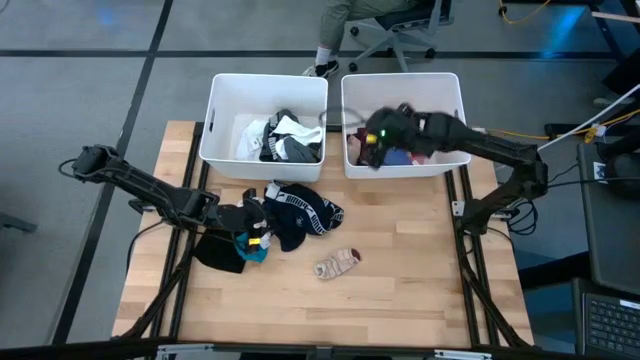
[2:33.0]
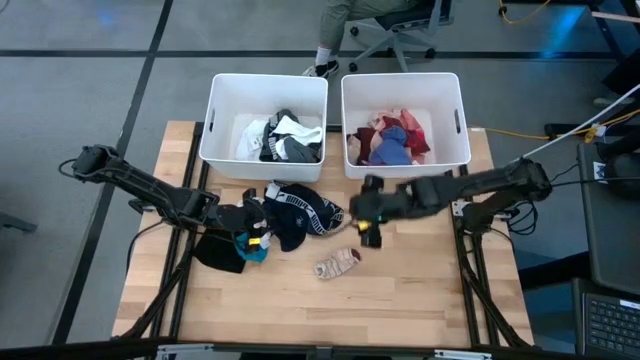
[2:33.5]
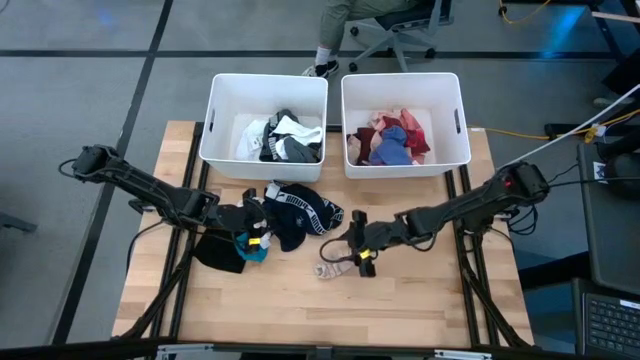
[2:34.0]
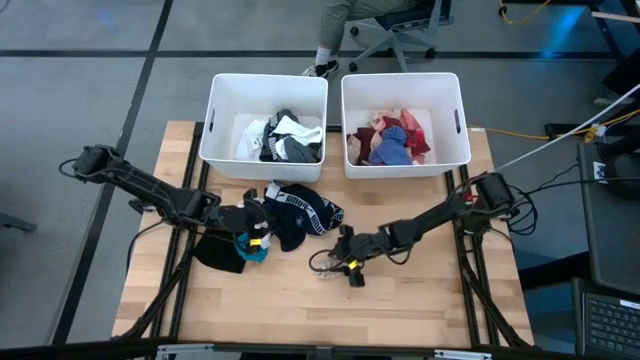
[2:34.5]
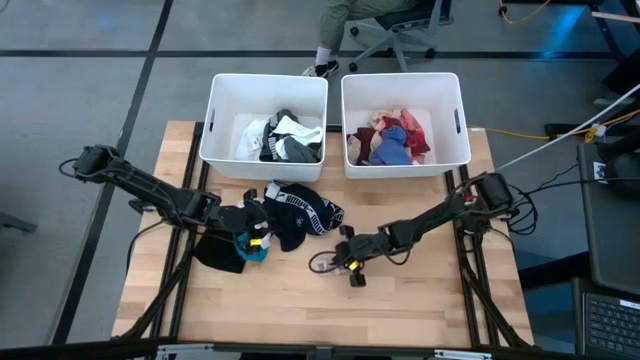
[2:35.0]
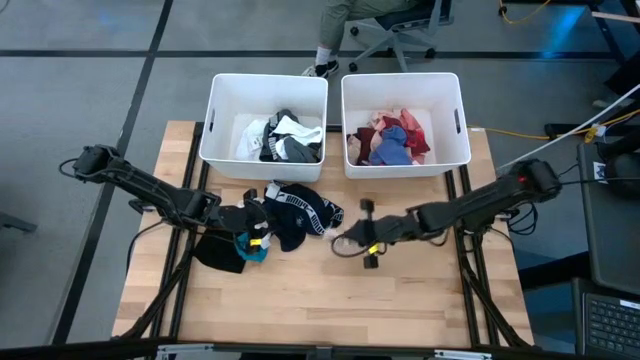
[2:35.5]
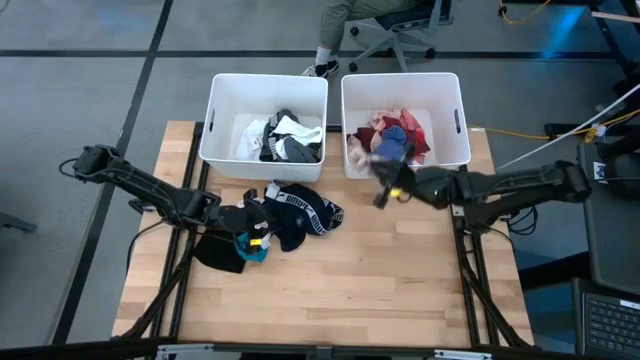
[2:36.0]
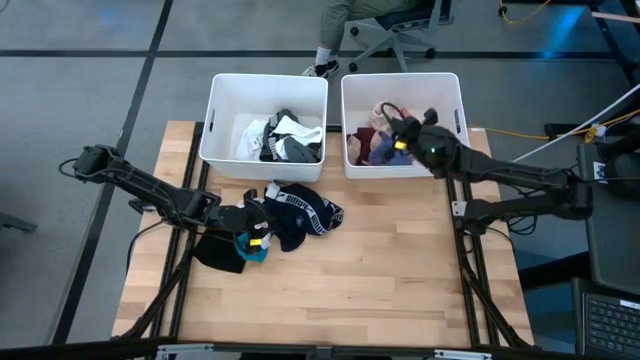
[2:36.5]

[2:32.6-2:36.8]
Task: Sort clothes
Put the brown stripe sock into the right white laundry bin

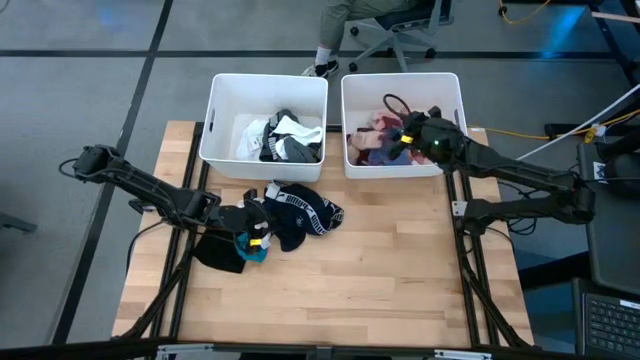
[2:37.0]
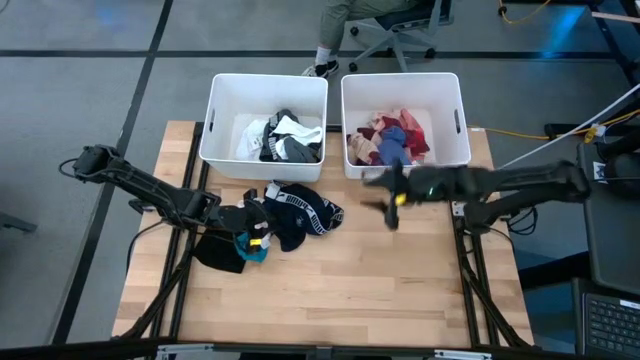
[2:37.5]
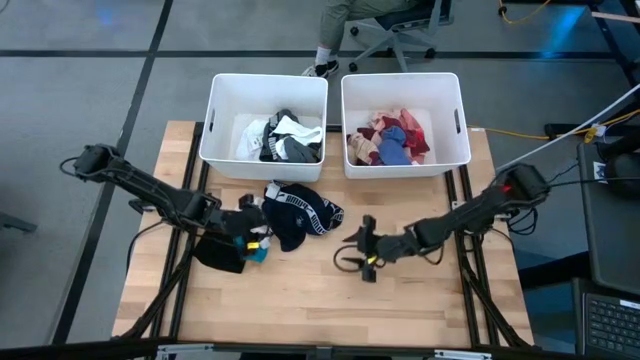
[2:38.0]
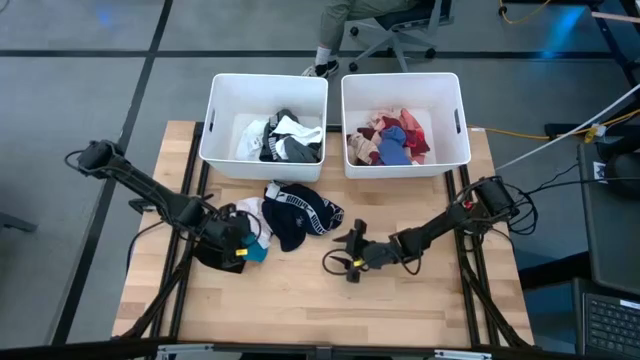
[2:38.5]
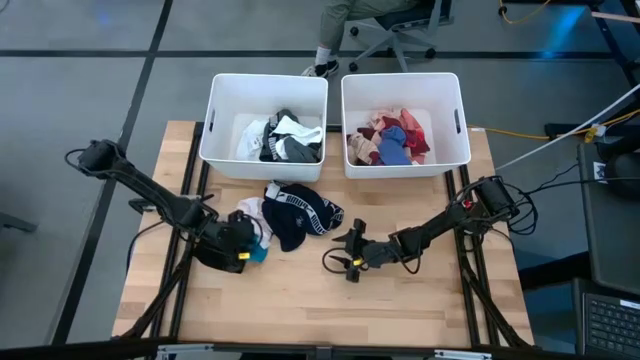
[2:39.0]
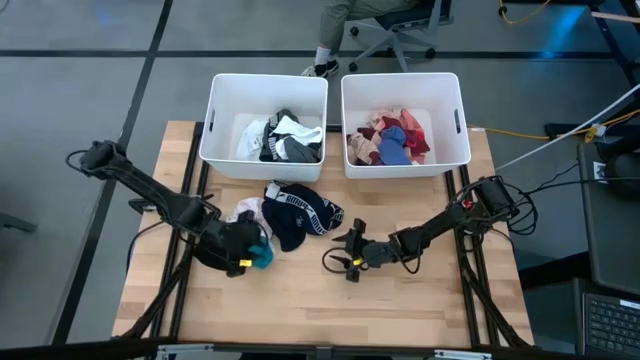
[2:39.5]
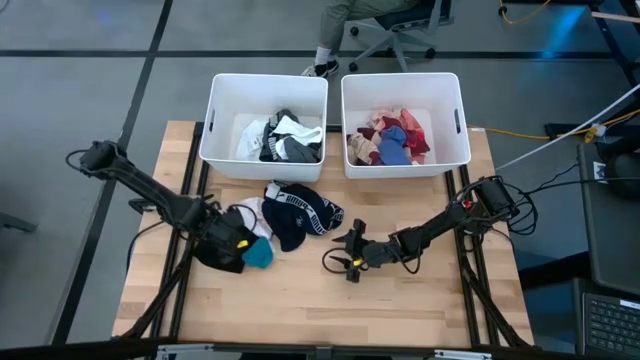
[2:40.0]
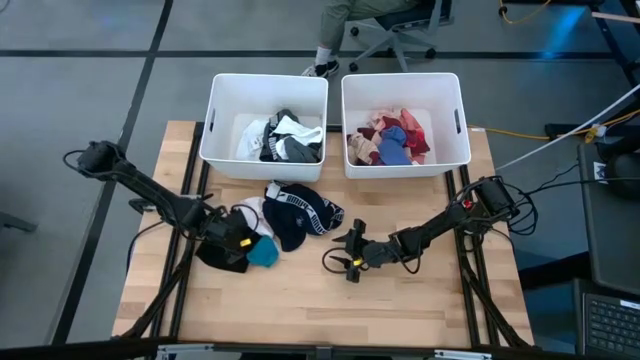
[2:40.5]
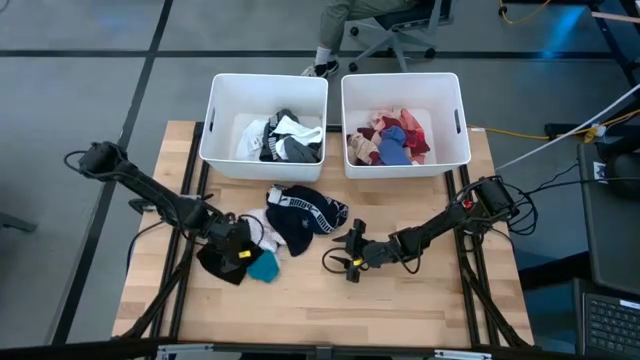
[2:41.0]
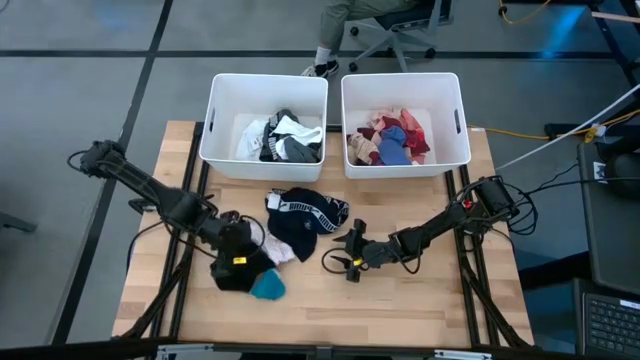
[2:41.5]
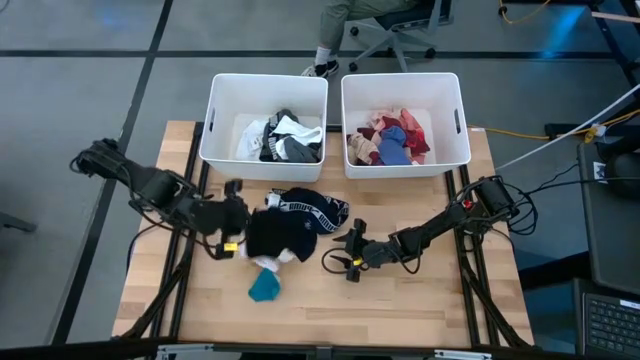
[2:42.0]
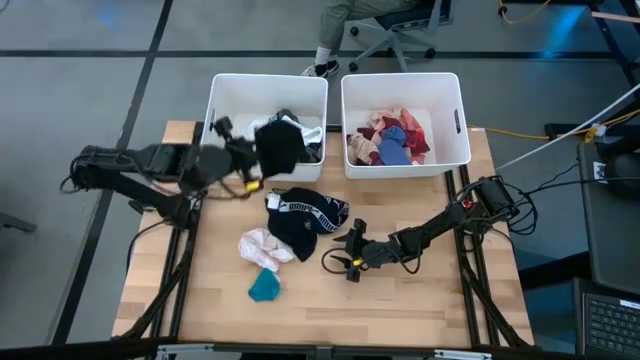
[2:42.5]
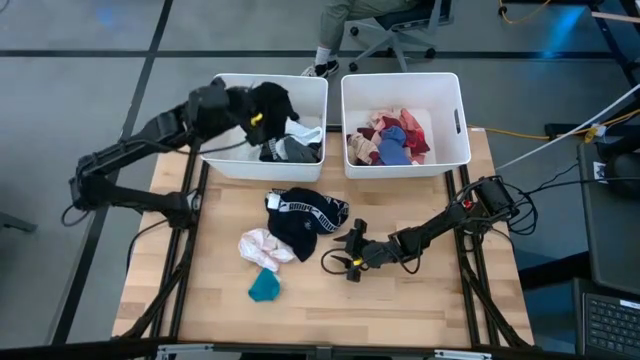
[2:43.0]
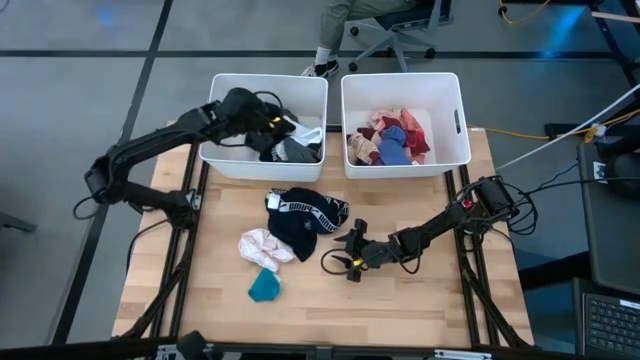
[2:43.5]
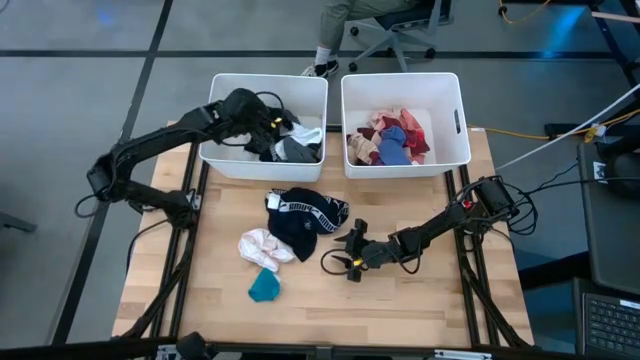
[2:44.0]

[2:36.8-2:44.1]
Put the black underwear into the left white laundry bin

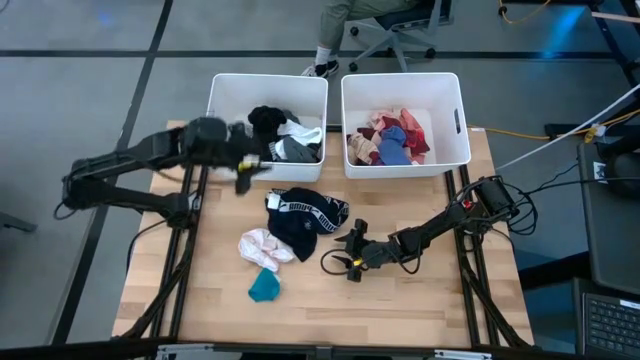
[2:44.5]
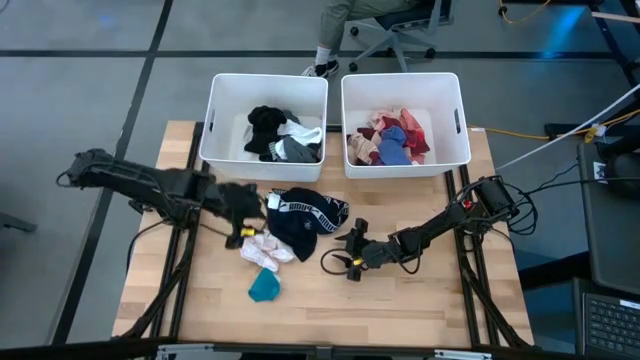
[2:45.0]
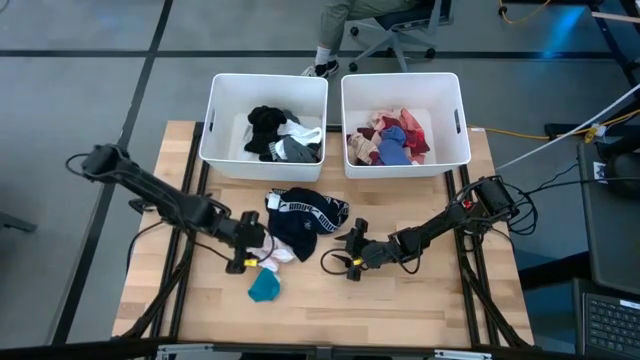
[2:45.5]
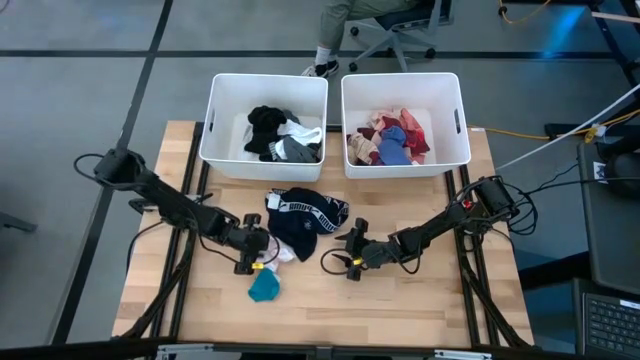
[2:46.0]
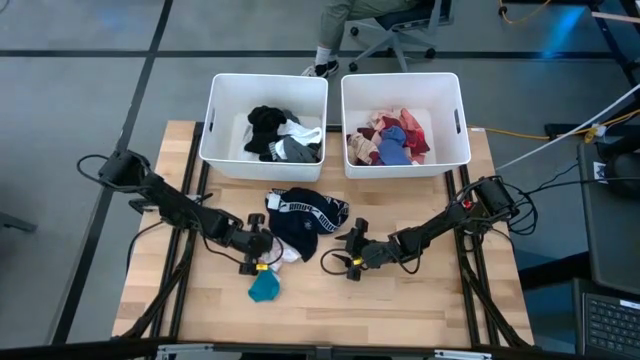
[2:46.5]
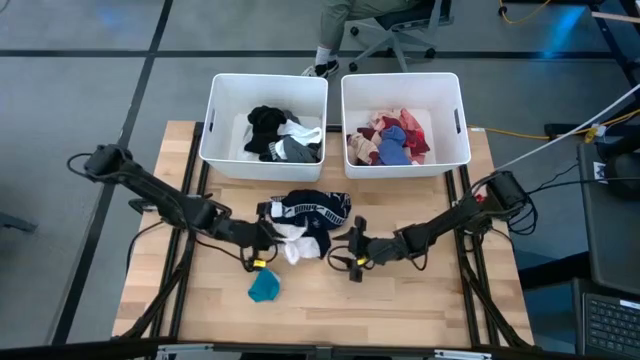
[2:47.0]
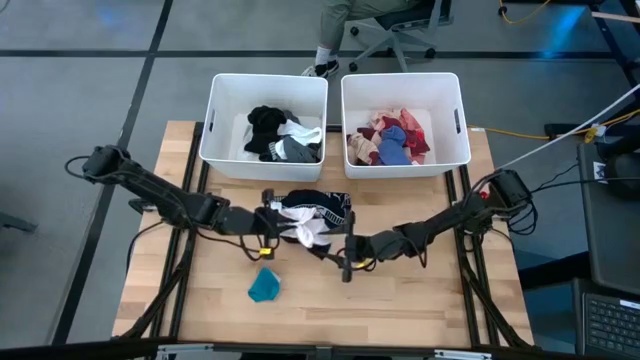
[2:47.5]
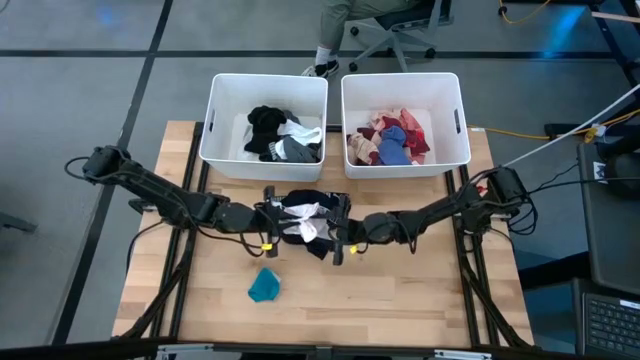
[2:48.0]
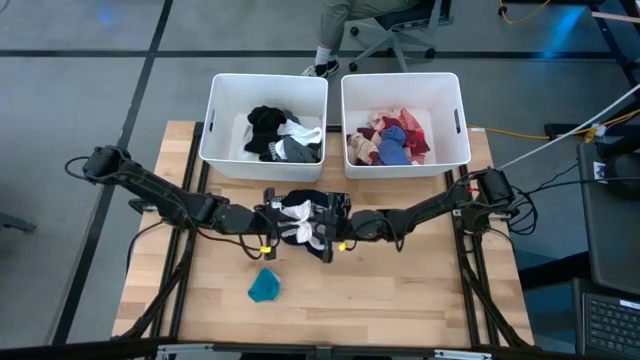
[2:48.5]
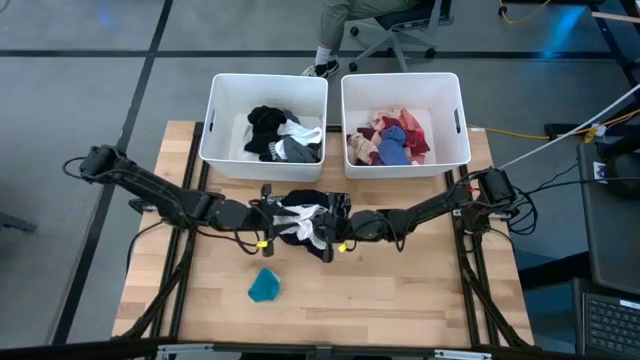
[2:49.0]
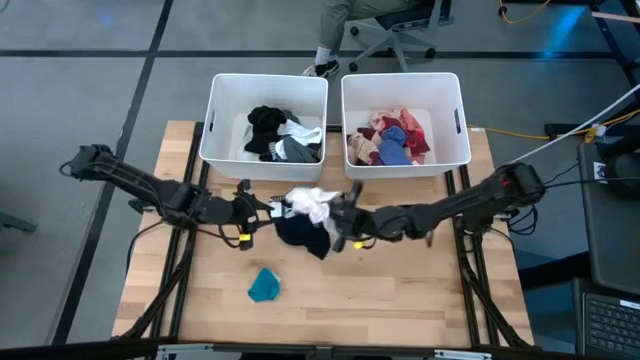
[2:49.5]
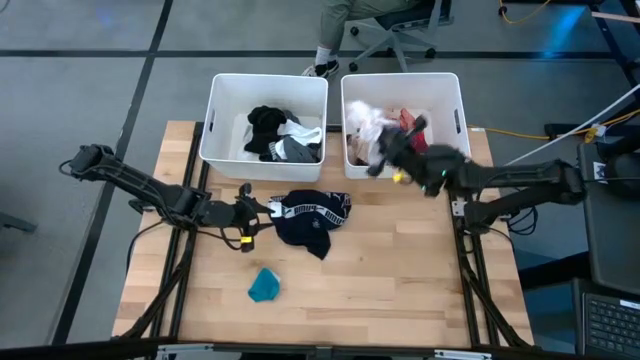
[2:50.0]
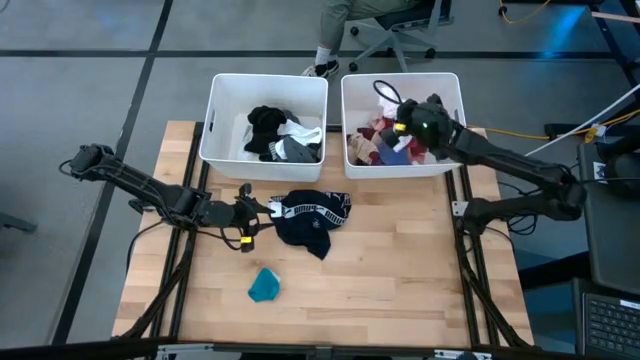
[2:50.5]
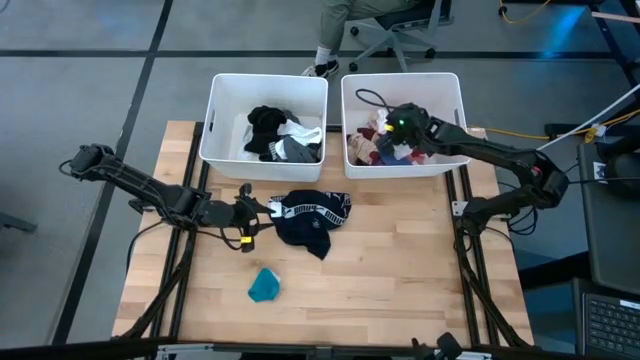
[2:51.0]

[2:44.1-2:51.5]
Put the peach underwear into the right white laundry bin

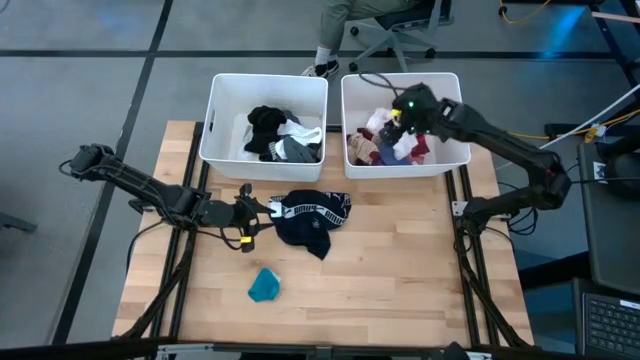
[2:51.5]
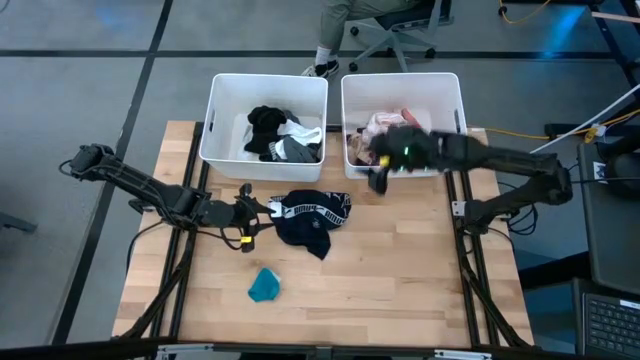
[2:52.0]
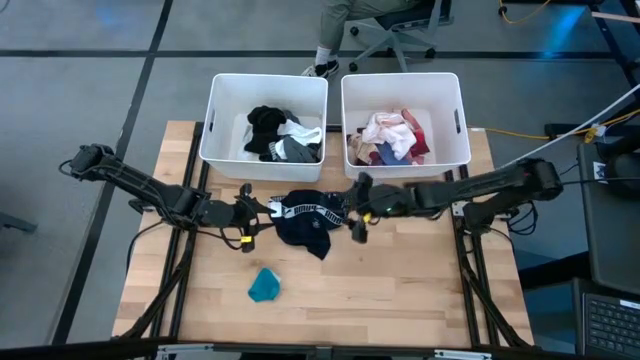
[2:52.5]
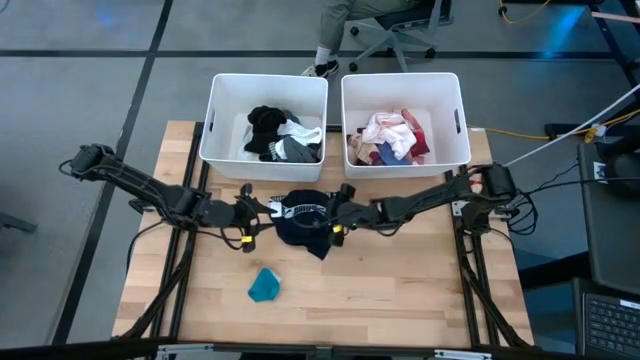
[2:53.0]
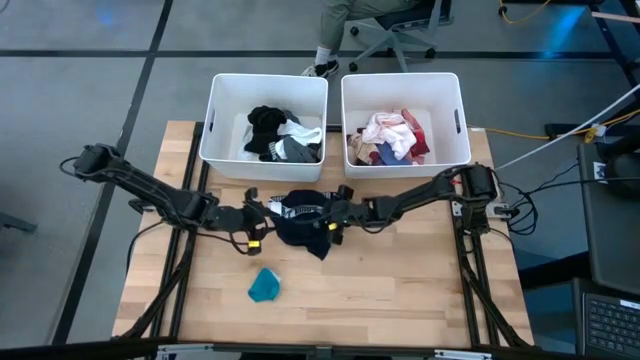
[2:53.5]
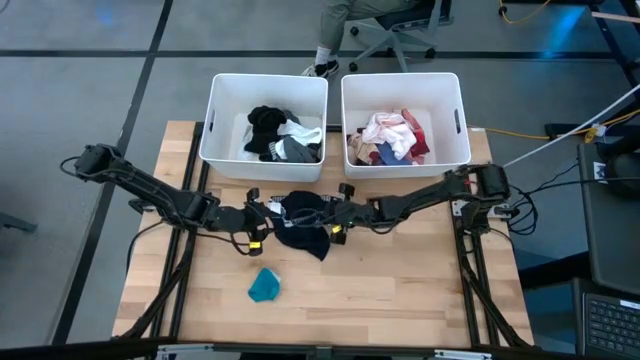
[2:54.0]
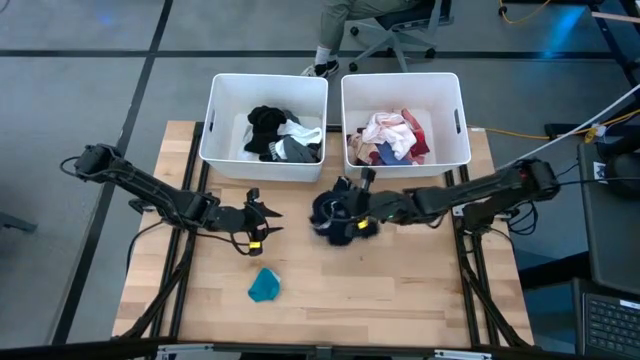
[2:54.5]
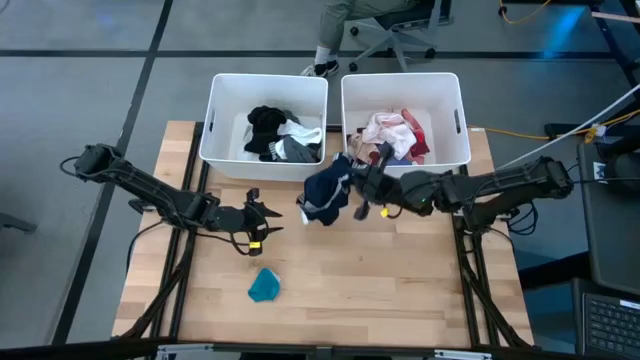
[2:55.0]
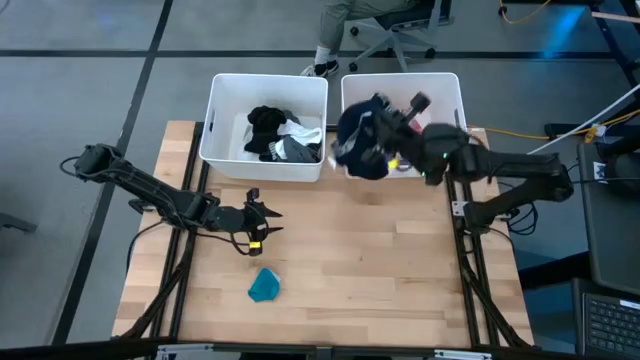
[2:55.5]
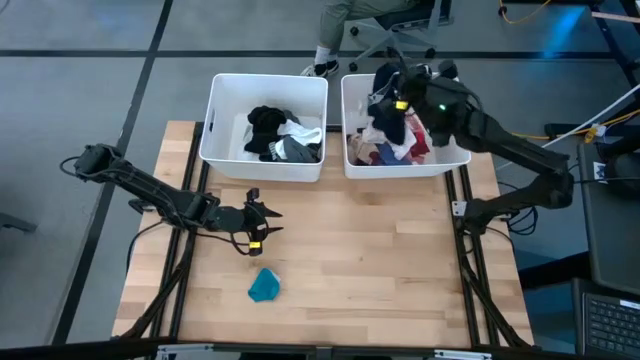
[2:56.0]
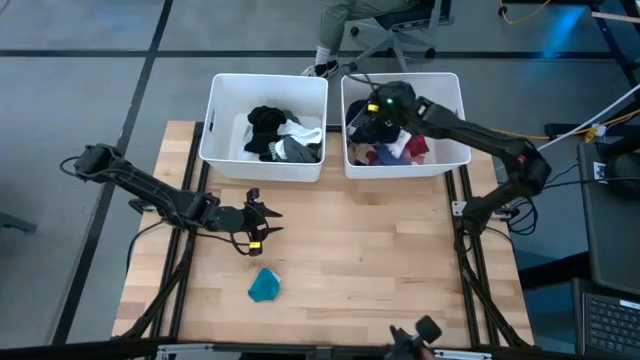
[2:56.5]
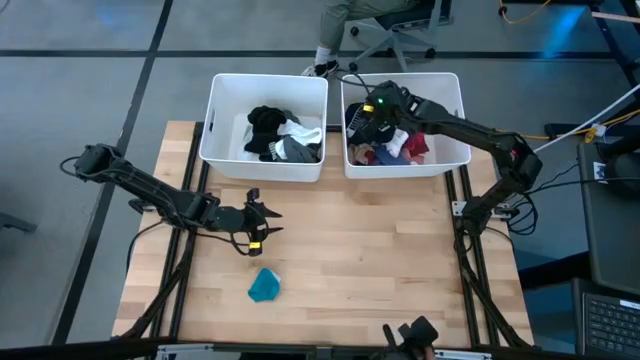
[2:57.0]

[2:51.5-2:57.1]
Put the dark blue boxer into the left white laundry bin
